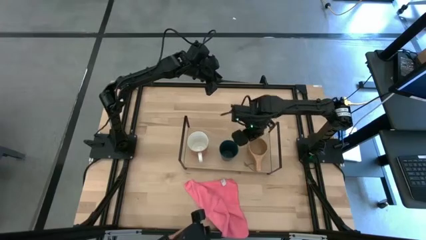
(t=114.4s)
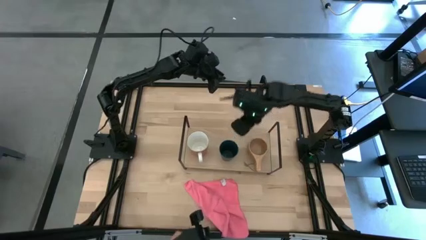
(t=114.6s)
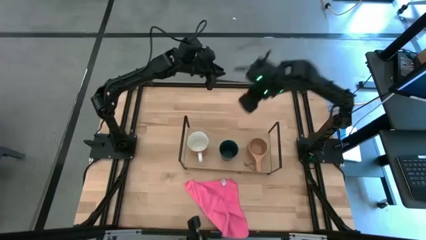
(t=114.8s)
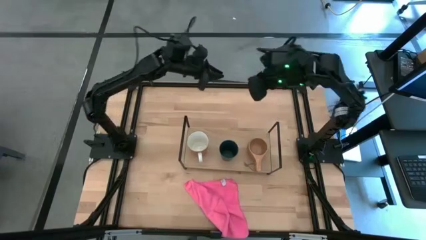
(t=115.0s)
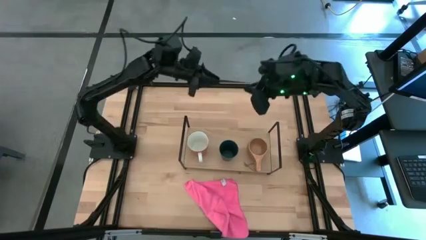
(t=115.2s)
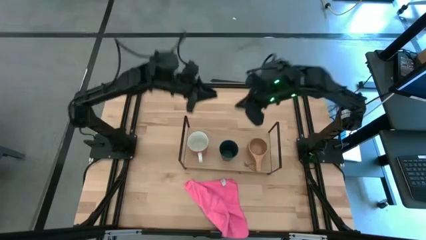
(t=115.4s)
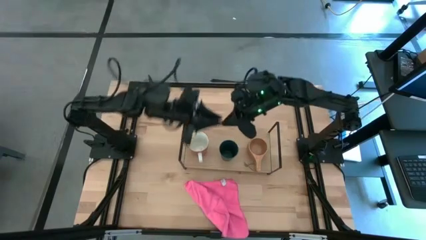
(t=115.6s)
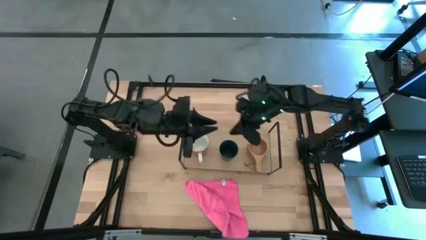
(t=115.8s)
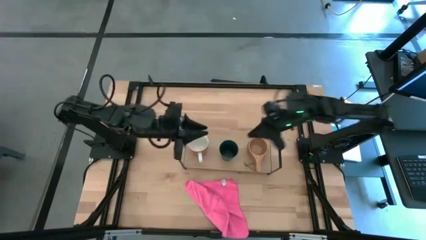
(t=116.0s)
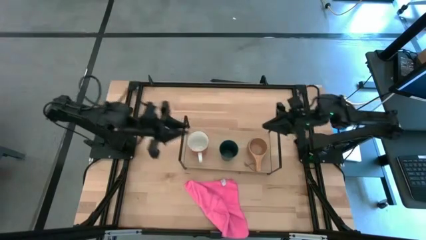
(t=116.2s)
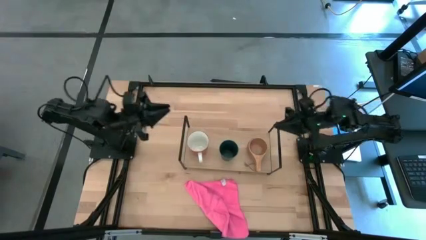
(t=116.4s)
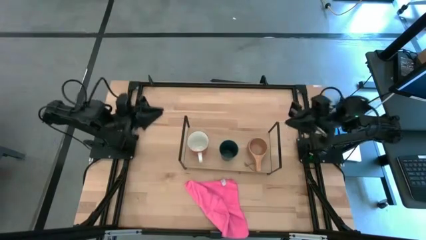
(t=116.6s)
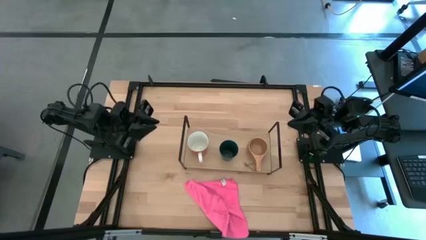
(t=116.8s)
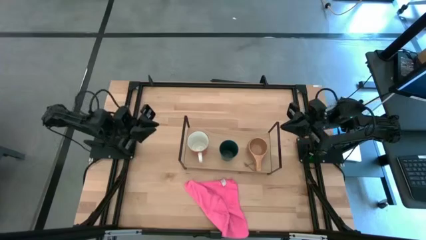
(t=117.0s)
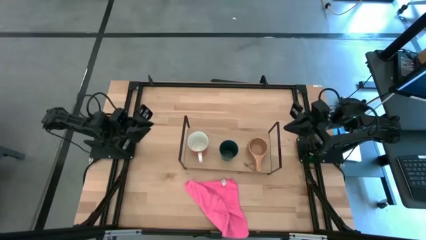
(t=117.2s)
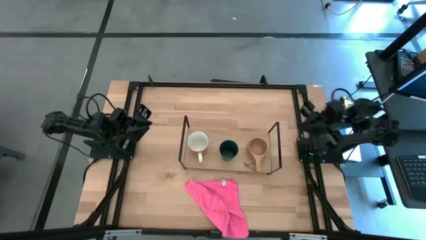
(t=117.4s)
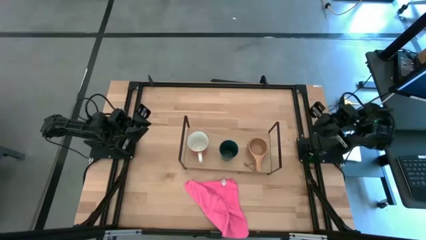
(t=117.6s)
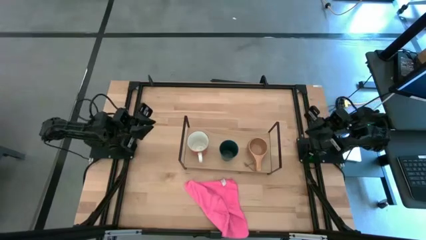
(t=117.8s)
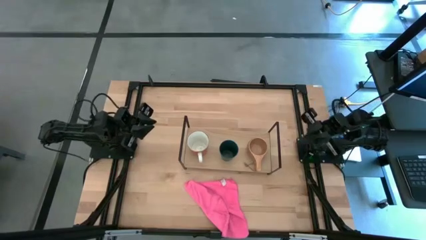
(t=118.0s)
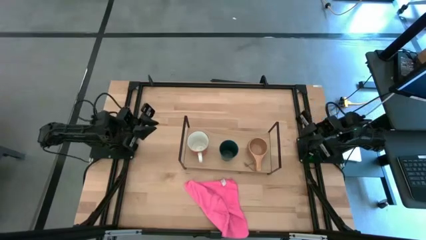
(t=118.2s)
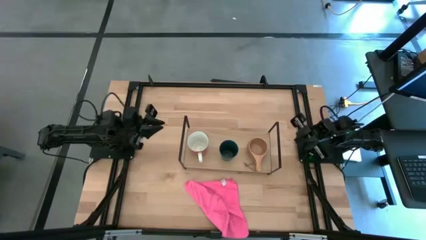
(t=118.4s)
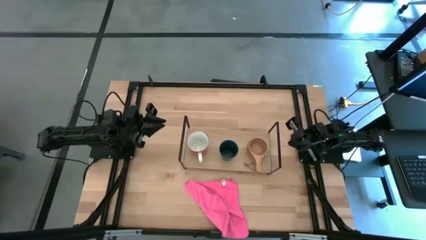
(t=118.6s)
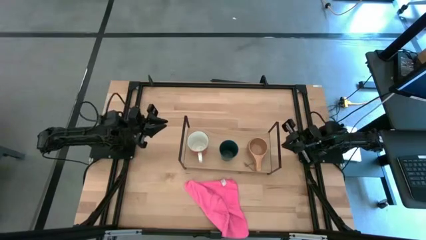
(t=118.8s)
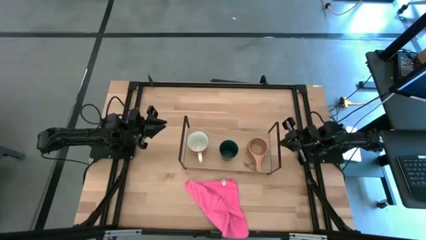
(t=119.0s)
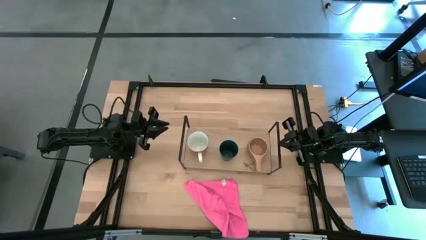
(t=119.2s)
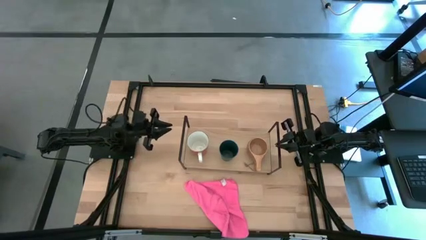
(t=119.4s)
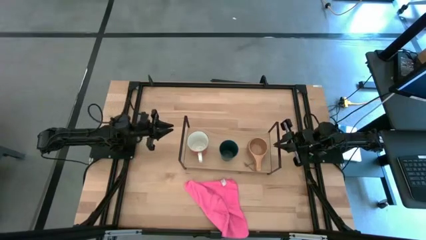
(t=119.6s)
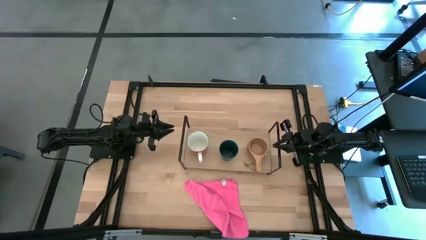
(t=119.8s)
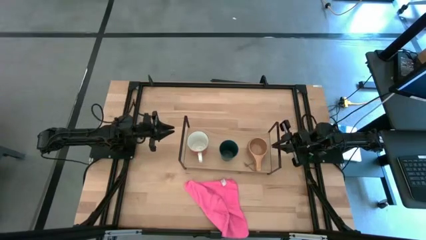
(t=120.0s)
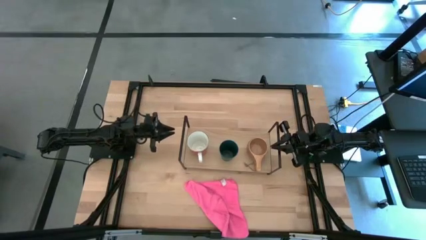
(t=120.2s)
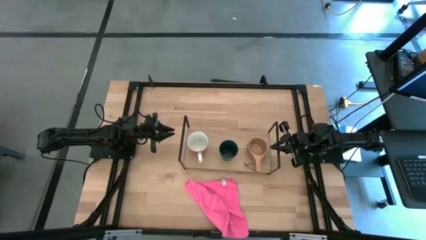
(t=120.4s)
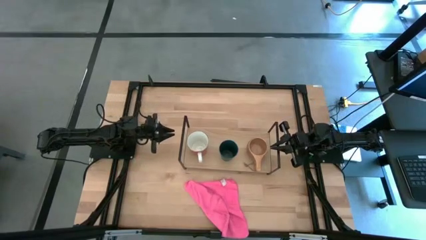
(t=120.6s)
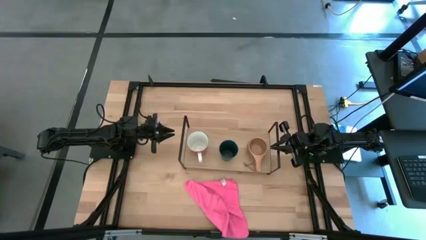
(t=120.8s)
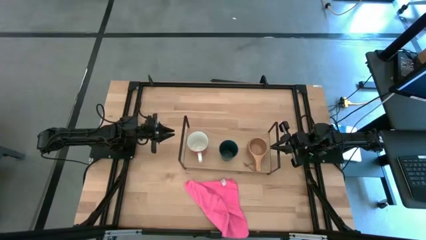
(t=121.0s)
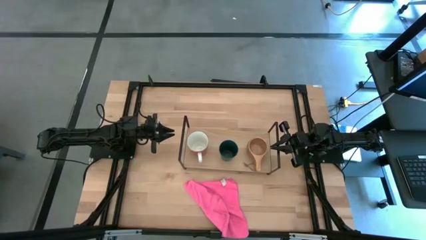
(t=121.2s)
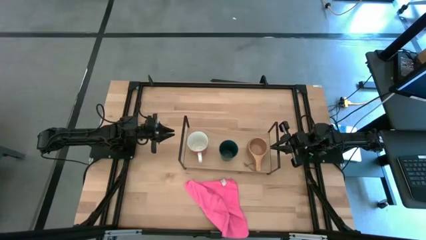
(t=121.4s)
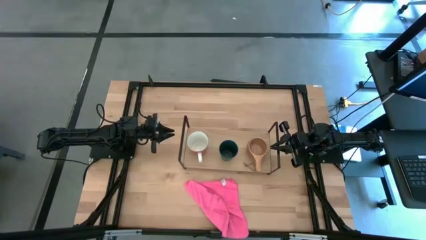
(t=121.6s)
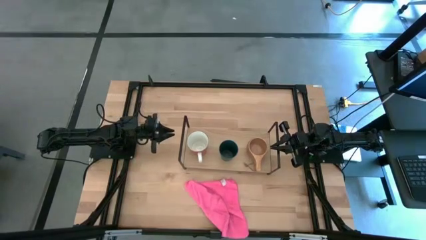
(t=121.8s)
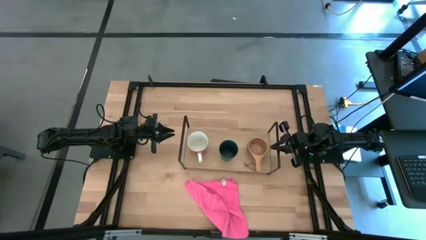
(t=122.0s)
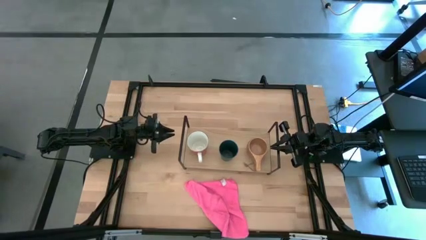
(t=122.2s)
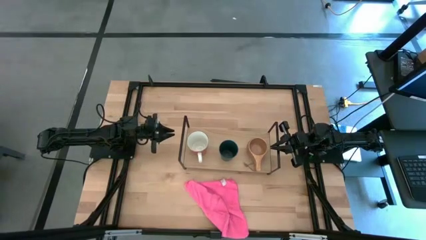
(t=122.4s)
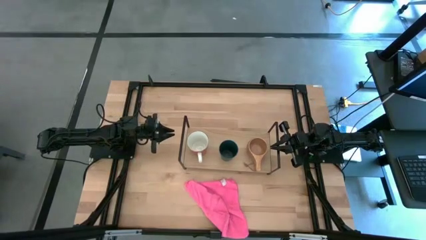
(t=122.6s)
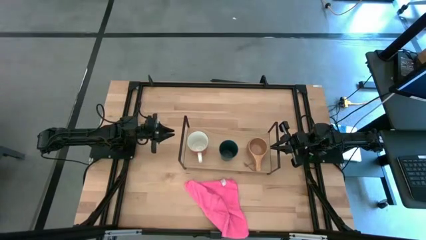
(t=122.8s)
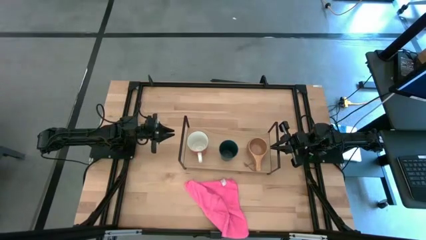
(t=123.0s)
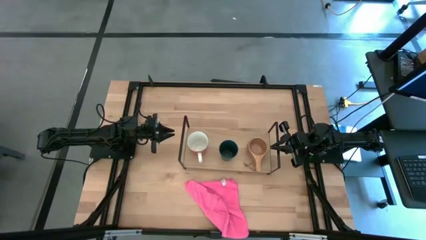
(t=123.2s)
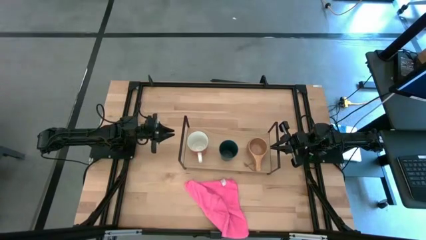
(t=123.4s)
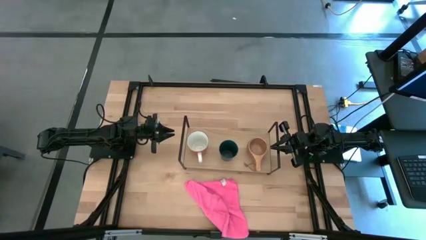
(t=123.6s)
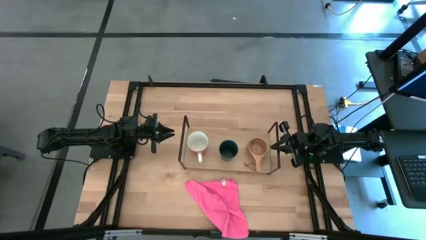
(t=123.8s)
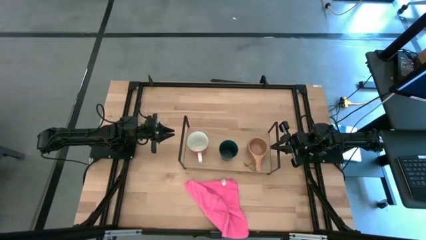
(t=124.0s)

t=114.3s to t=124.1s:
Task: Stack small to large cups/mugs on shelf
Return to home position

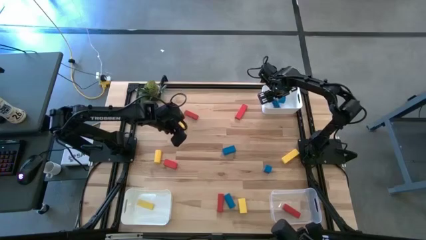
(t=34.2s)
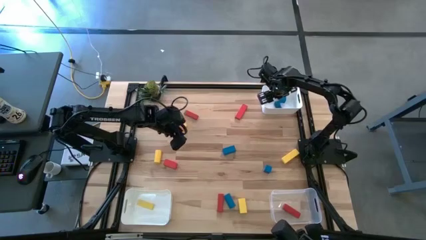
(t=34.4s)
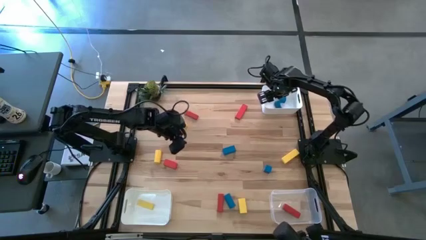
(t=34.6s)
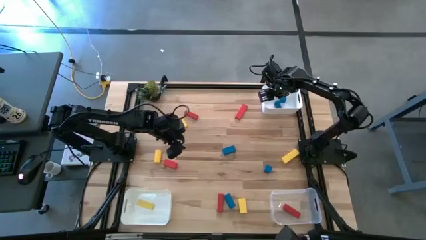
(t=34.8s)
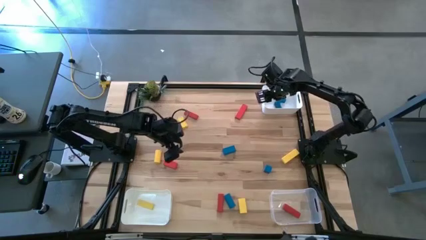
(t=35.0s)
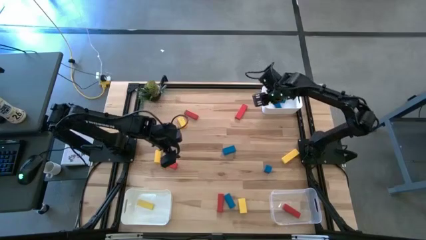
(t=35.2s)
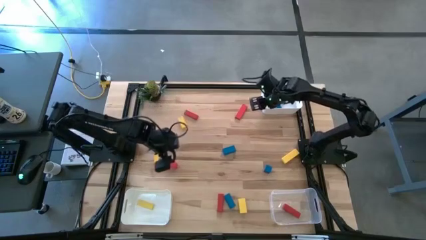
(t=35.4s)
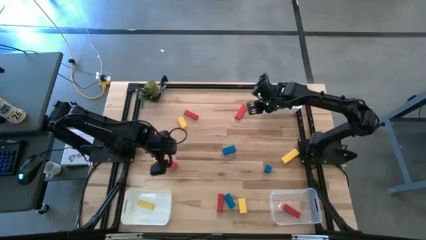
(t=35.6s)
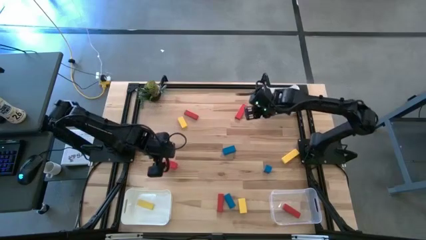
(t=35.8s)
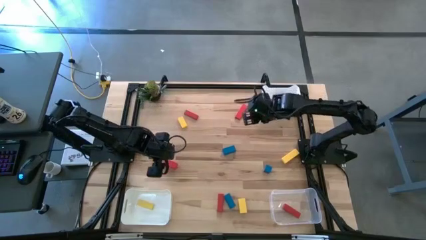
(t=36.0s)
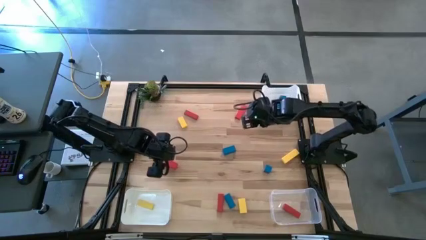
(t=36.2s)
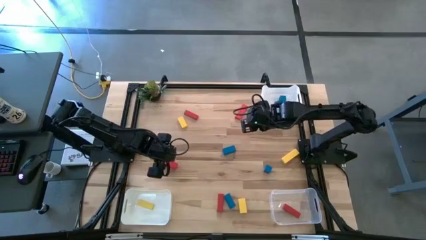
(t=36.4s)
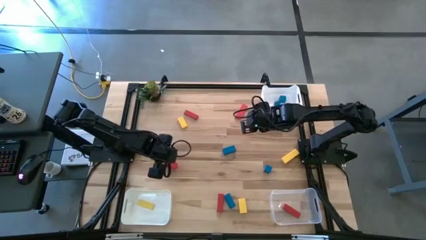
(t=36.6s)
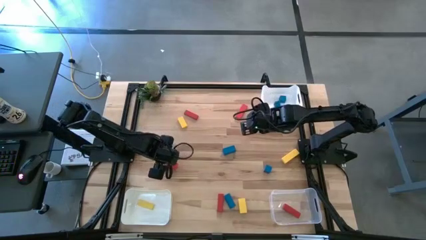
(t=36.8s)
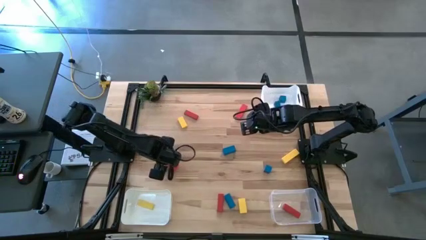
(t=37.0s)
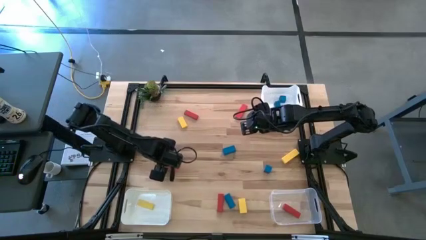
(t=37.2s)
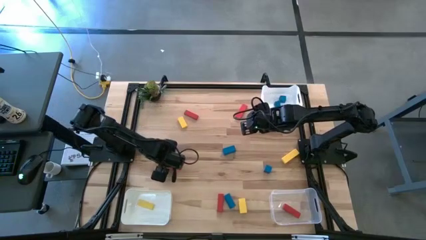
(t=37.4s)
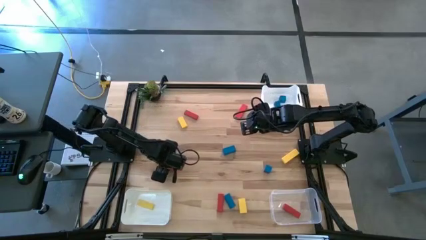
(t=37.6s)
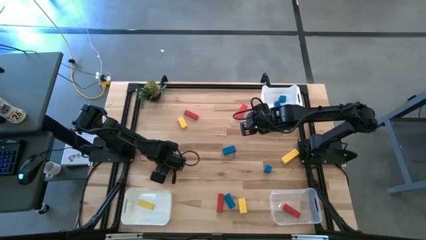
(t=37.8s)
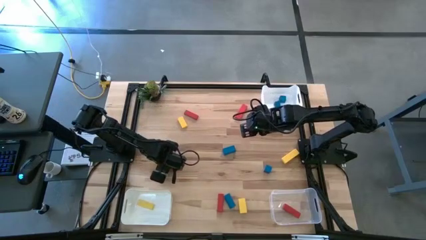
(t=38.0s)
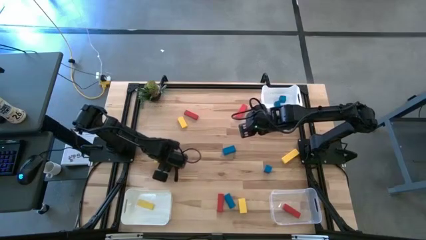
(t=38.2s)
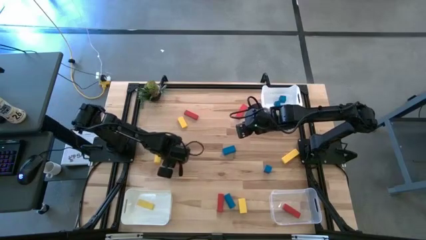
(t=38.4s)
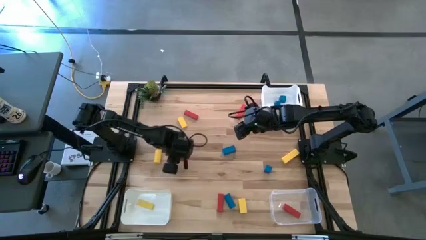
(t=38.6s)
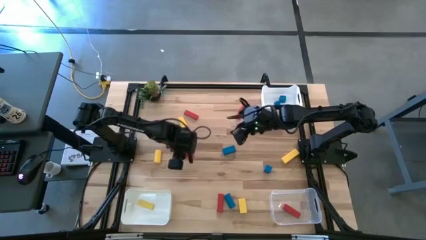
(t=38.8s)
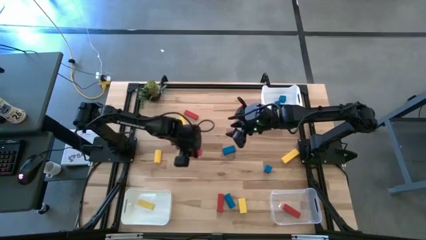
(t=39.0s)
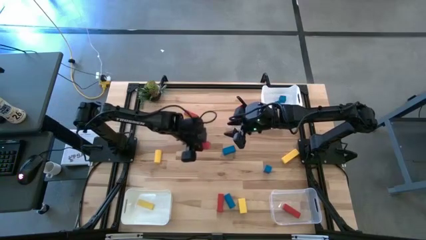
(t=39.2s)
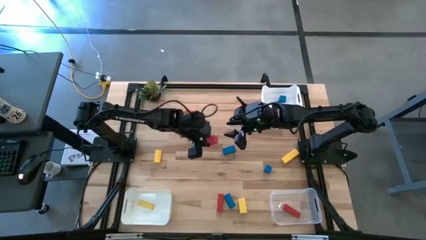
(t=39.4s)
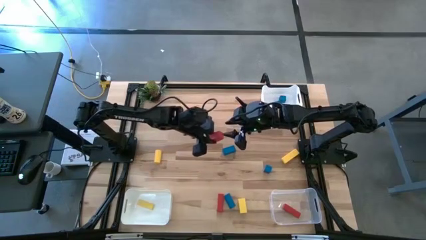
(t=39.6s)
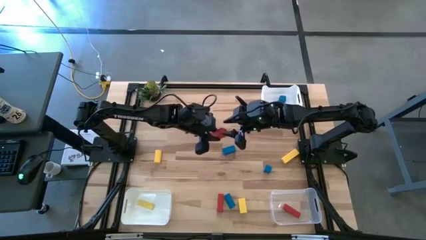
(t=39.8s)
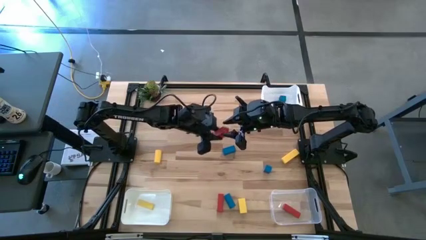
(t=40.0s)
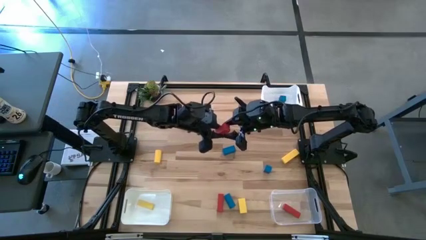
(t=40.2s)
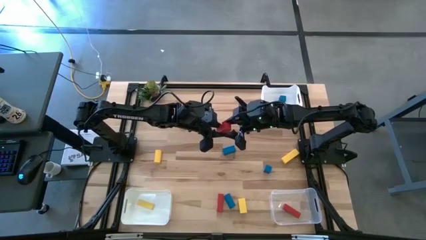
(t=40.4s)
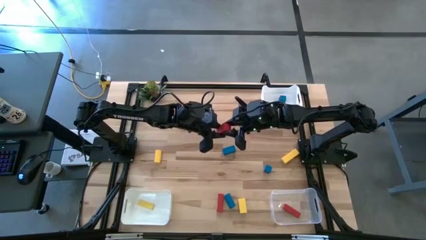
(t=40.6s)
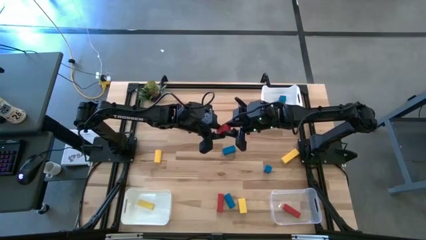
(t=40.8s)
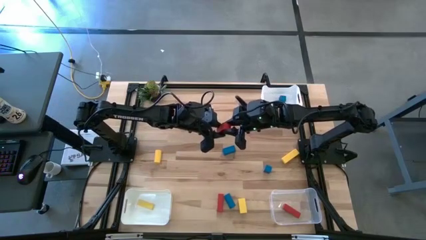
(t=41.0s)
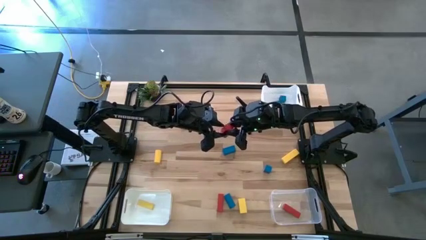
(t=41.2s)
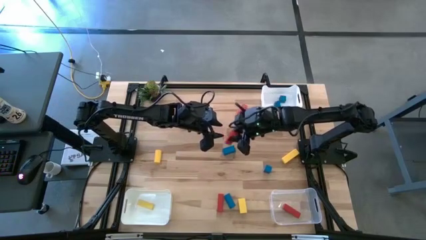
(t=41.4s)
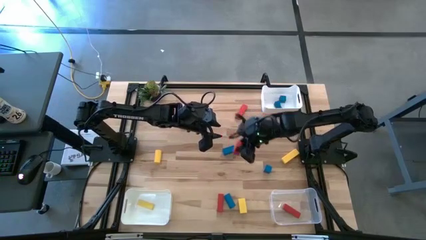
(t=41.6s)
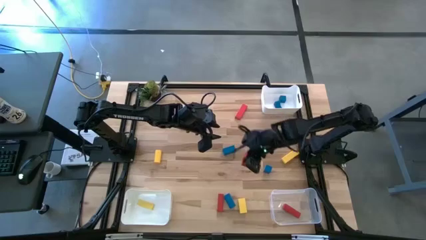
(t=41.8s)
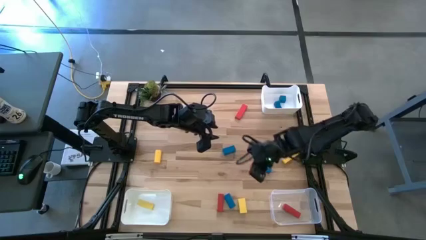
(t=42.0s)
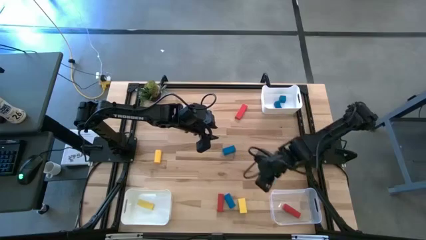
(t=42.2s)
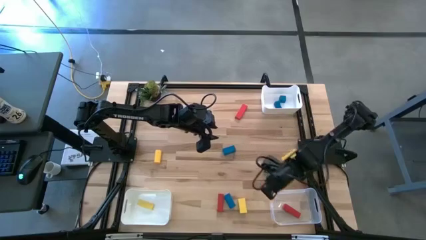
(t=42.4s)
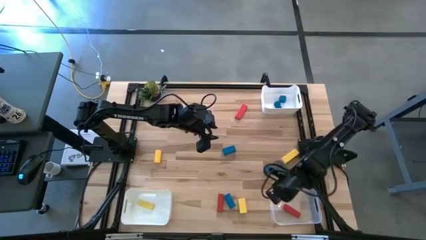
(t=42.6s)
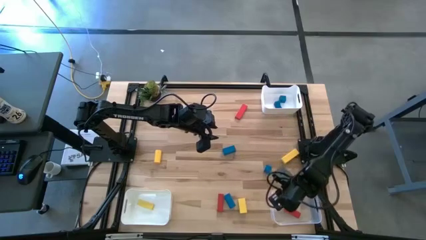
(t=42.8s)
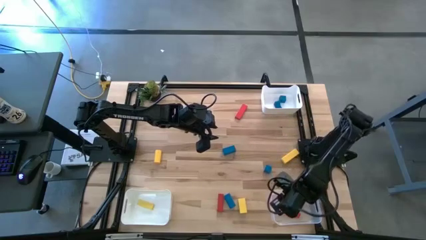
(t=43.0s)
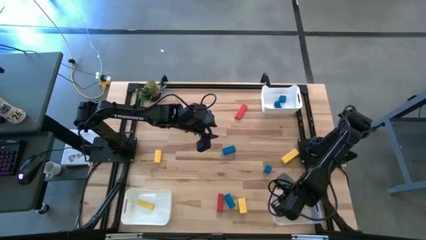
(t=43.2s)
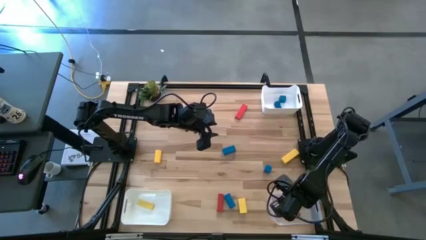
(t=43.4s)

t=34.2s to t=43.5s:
Task: Sort & place blocks by color
Put the red block into the transparent bin
